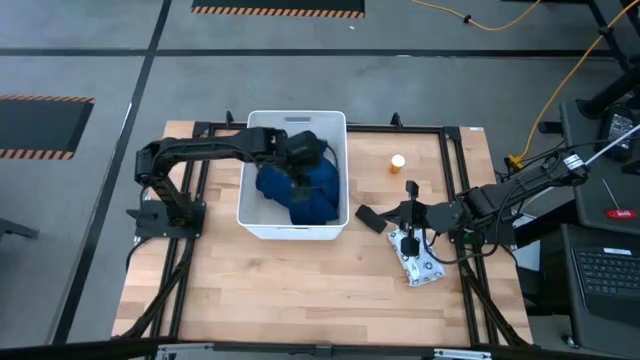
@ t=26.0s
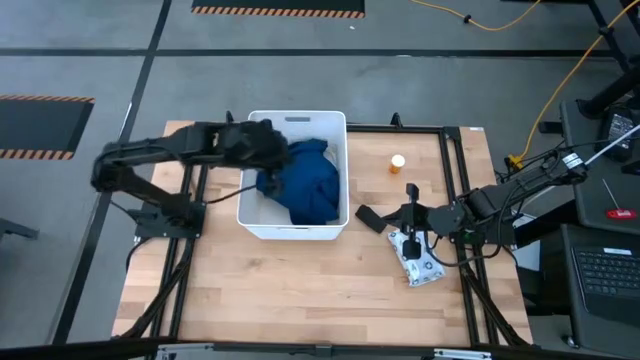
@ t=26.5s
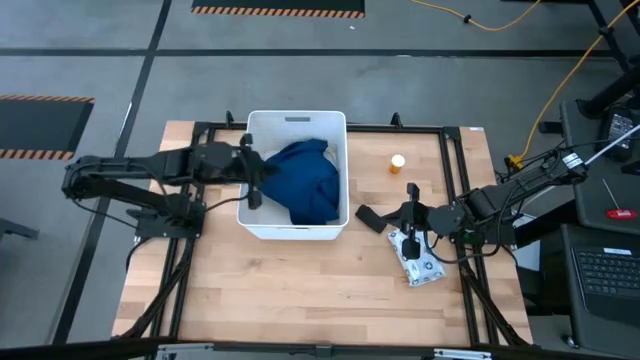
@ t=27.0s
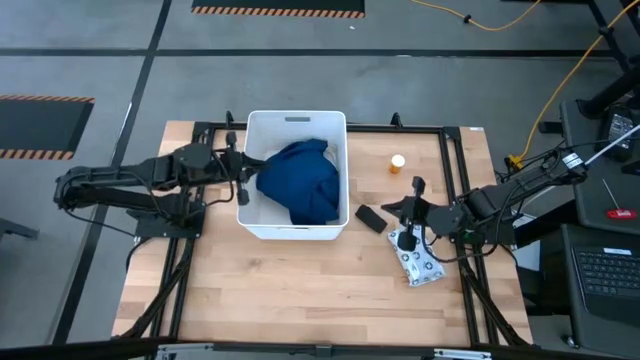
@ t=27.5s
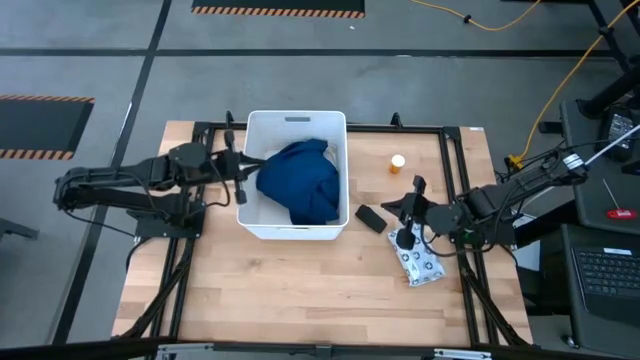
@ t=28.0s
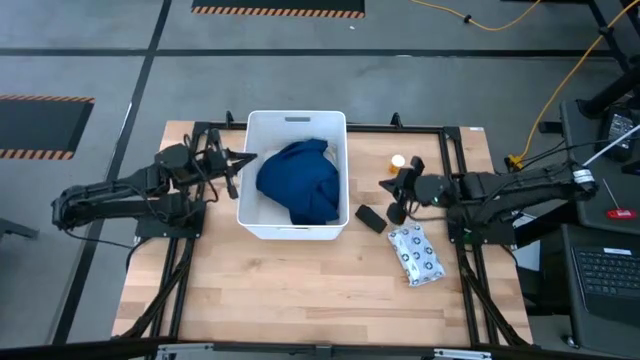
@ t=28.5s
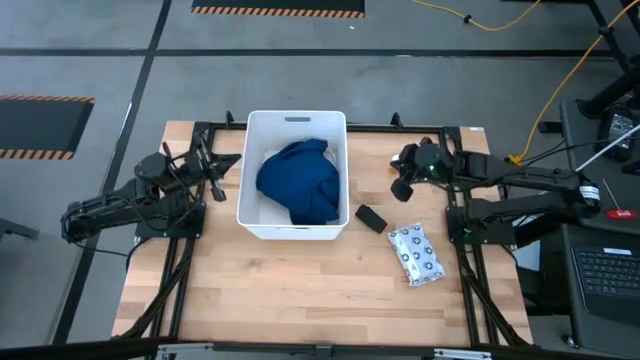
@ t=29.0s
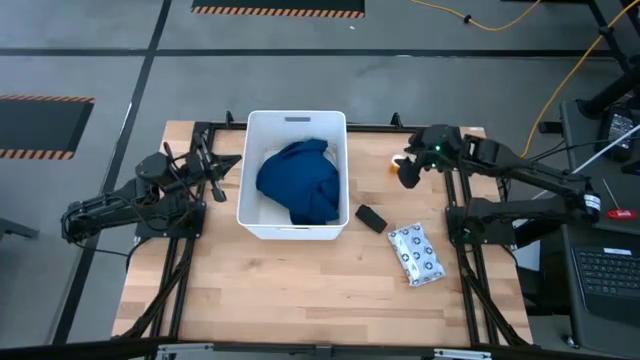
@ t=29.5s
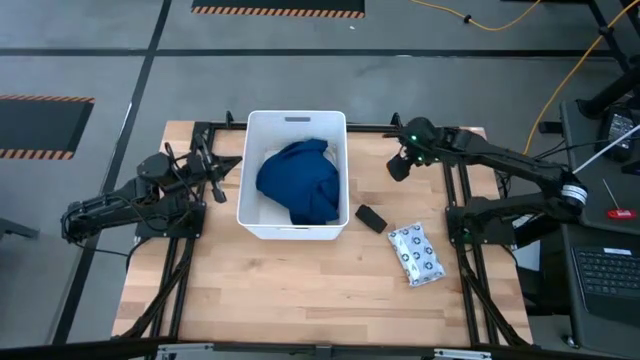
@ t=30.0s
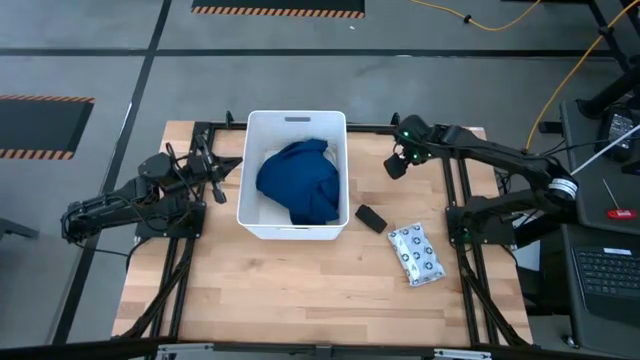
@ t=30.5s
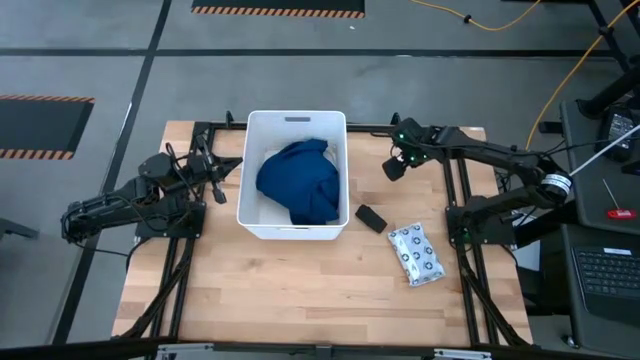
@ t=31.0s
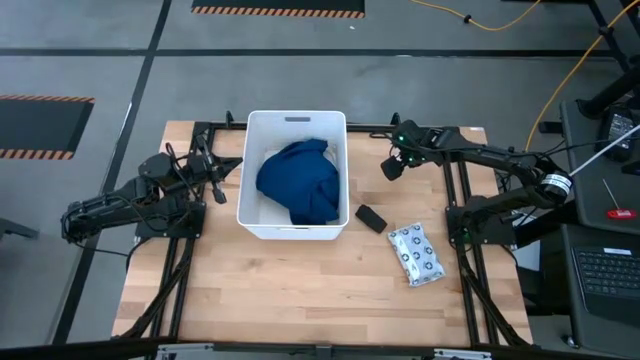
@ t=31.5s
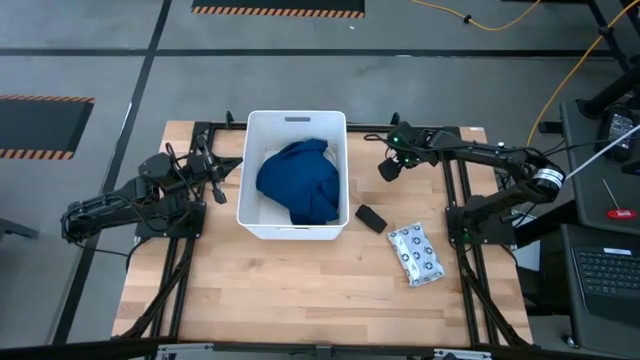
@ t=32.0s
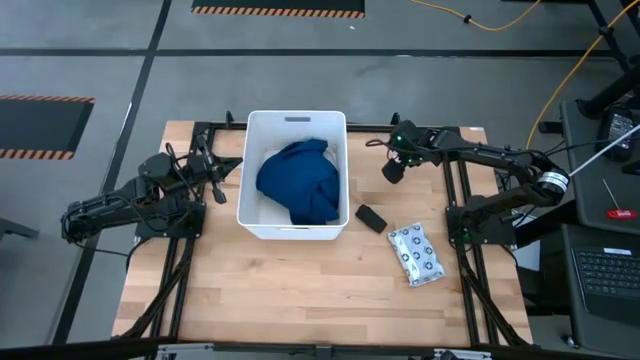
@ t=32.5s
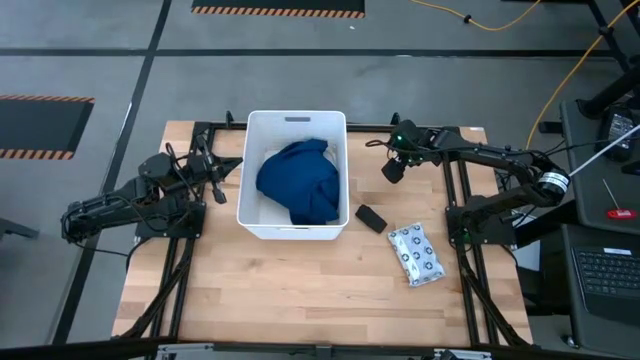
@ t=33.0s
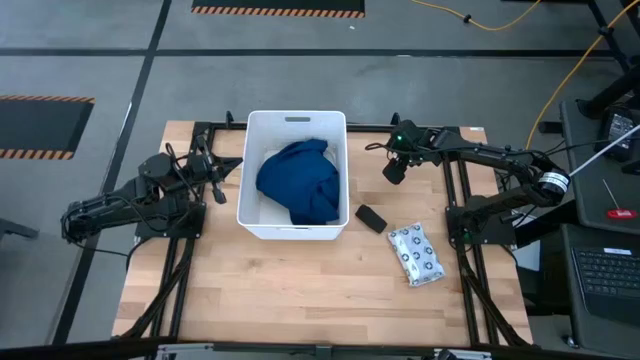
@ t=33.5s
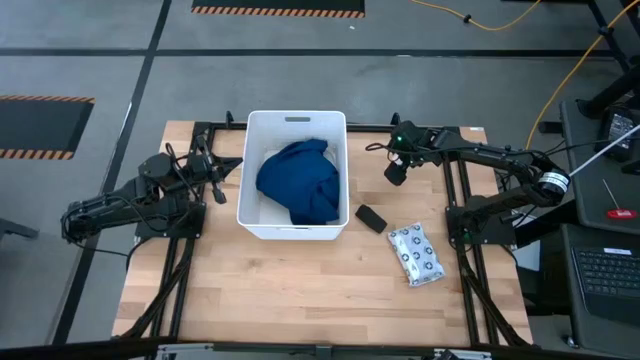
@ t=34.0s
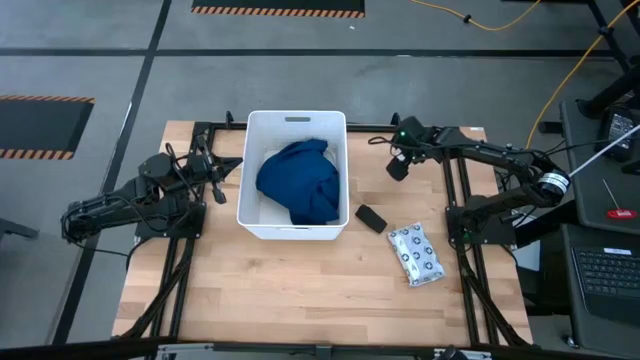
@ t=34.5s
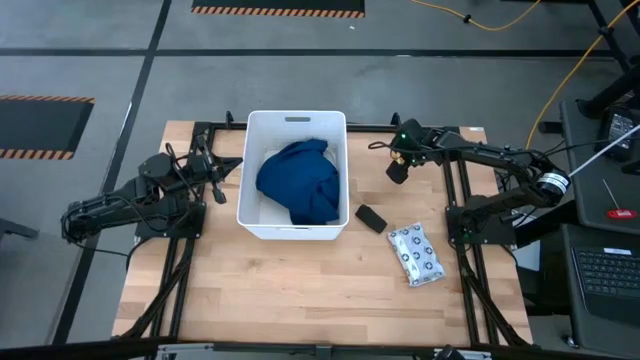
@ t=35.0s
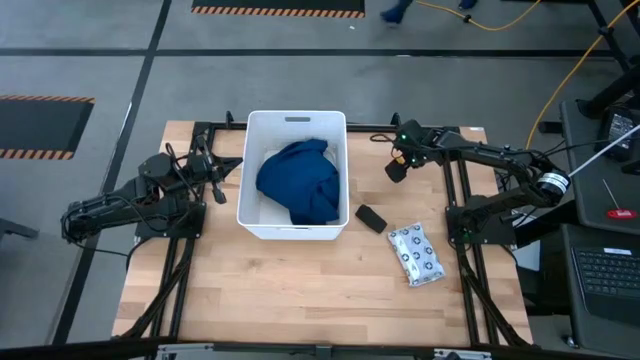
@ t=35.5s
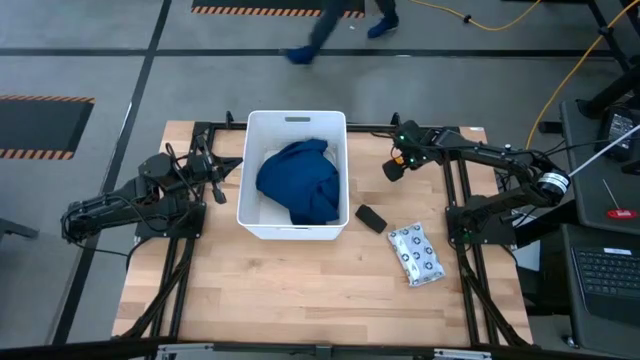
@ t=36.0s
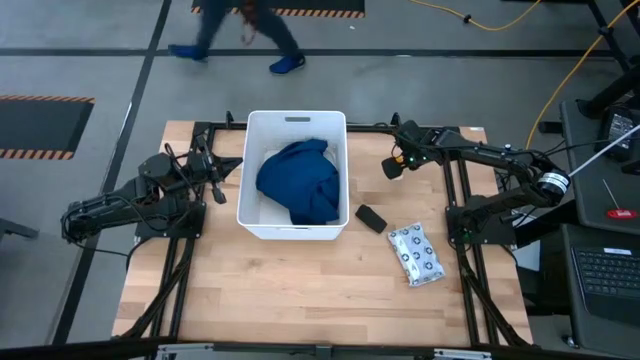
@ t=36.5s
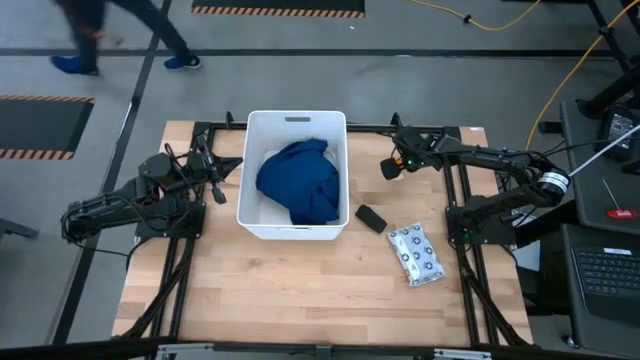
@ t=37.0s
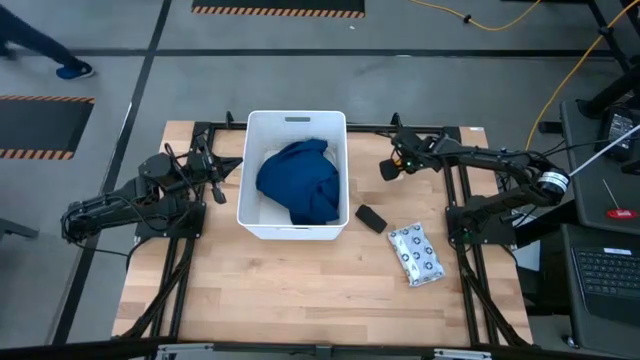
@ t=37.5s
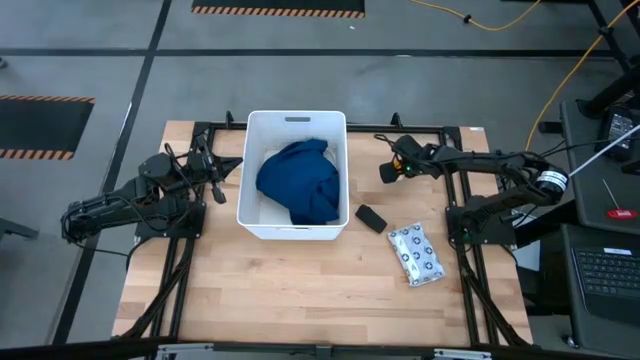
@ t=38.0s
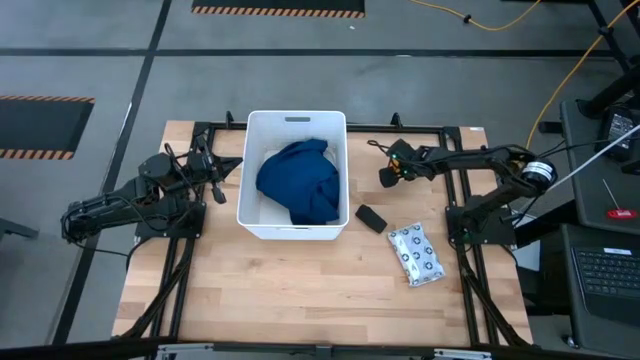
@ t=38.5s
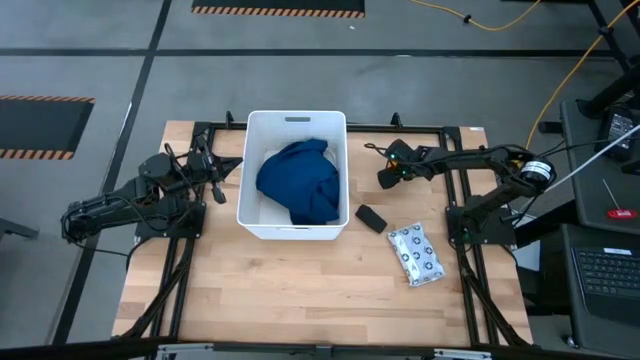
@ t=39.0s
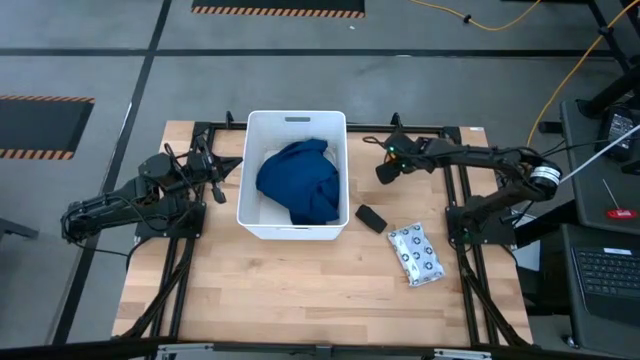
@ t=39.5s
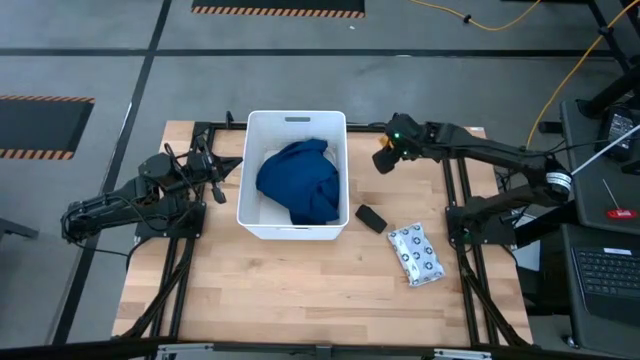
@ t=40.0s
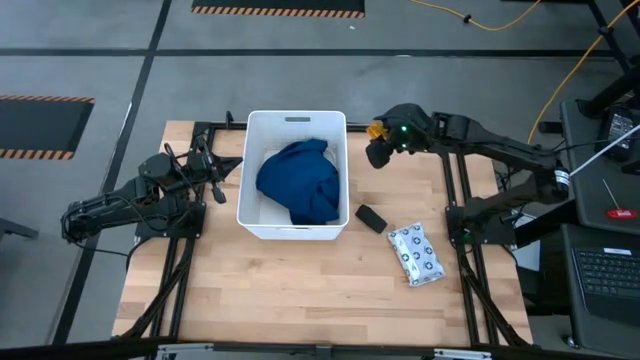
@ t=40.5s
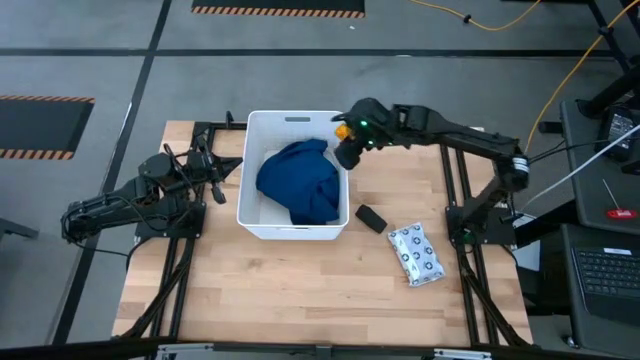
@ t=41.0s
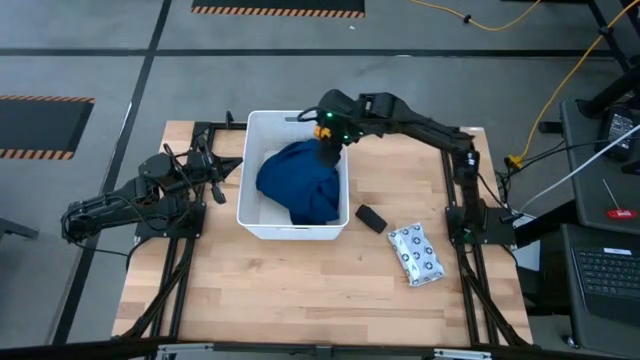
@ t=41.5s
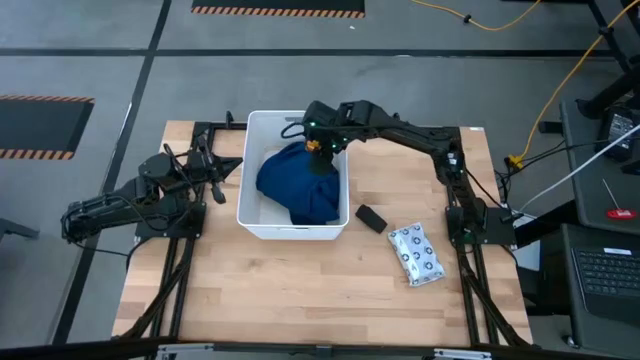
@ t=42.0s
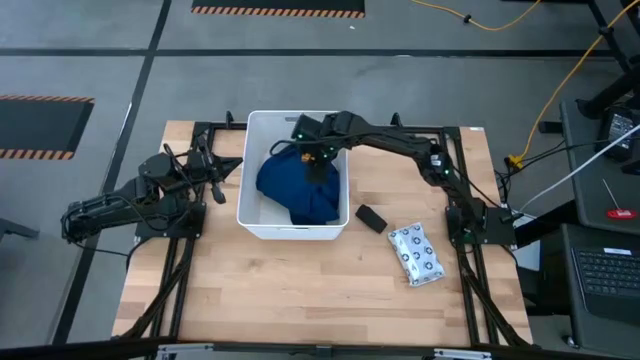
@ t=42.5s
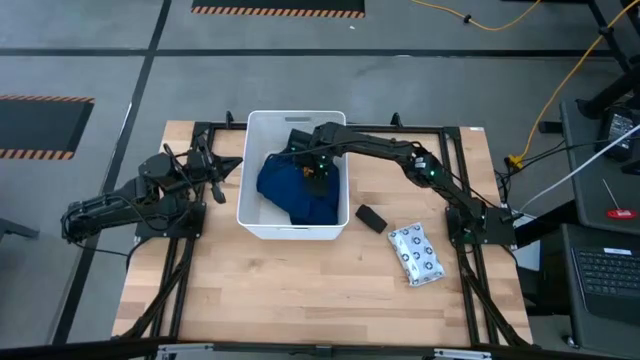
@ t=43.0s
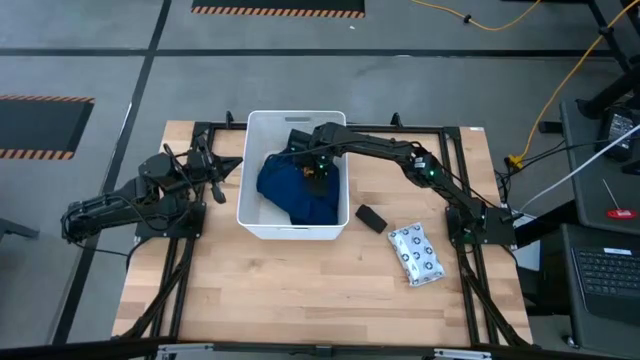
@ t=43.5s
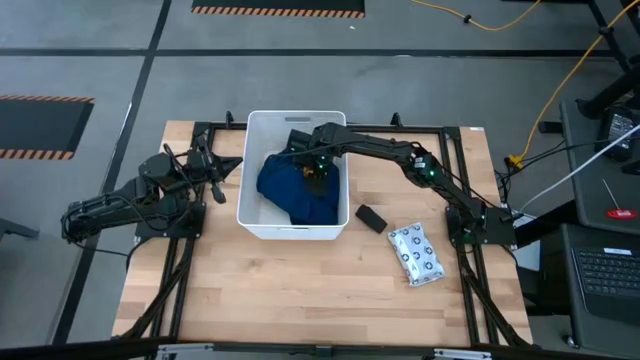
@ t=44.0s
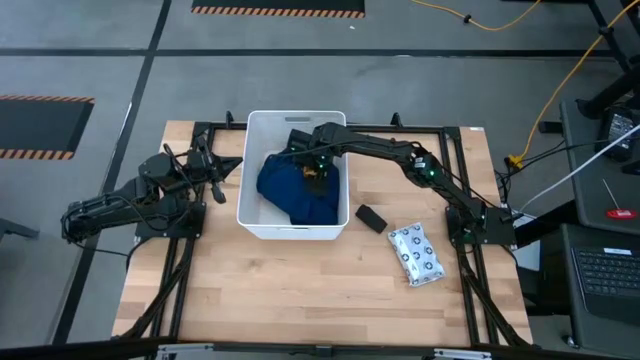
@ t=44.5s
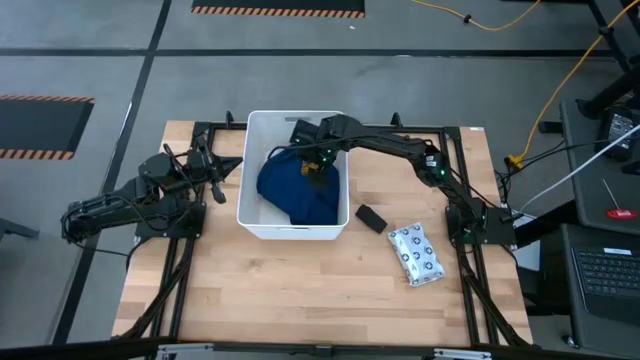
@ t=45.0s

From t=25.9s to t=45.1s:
Task: Pick & place medical supplies in basket/bin
Put the orange bottle into the white bin

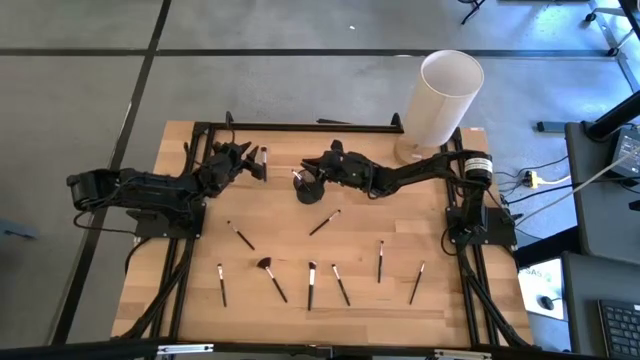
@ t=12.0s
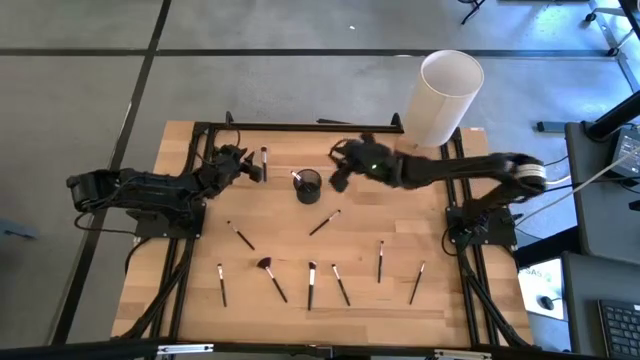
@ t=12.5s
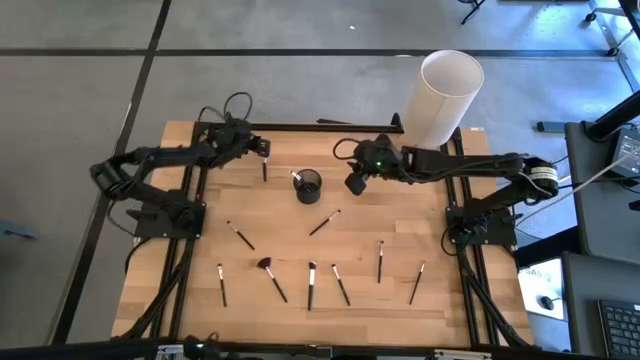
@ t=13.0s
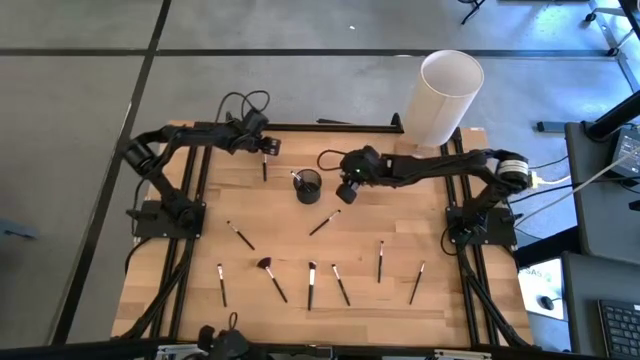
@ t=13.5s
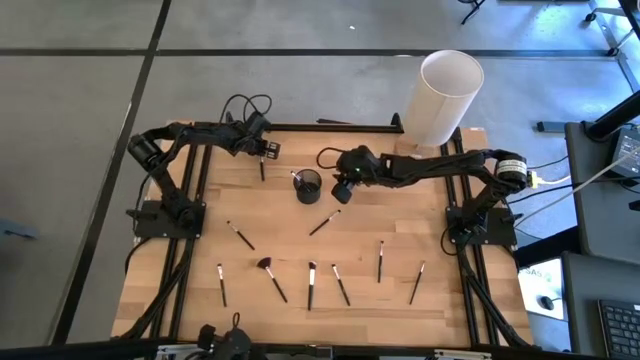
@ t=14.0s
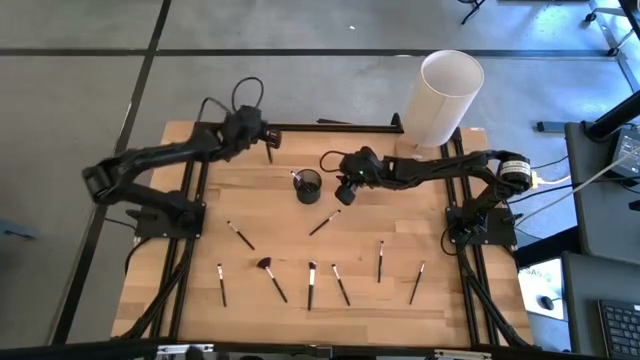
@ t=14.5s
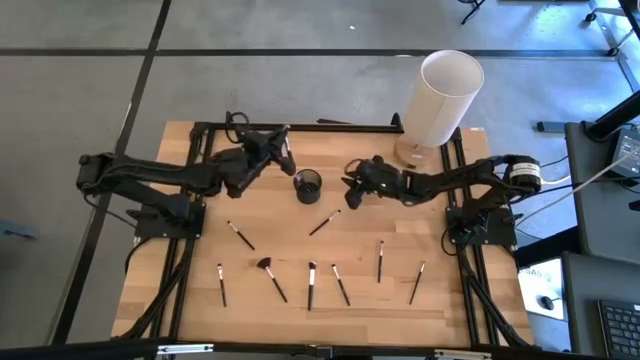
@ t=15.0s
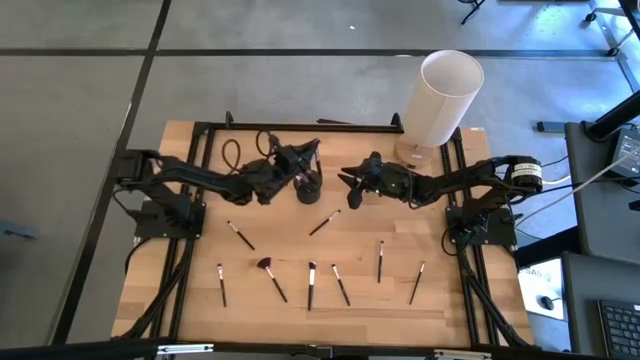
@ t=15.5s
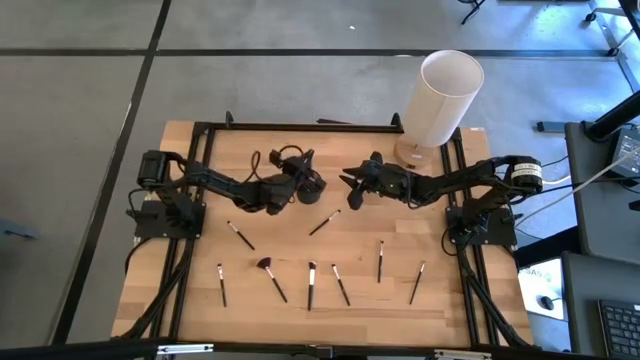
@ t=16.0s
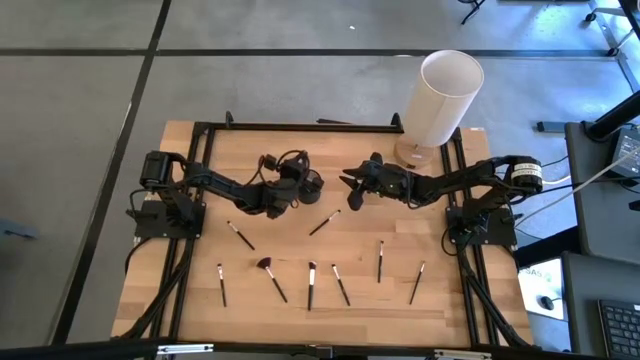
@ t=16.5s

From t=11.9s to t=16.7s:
Task: Put items in baskets/containers
Put the black powder brush into the black pen holder
